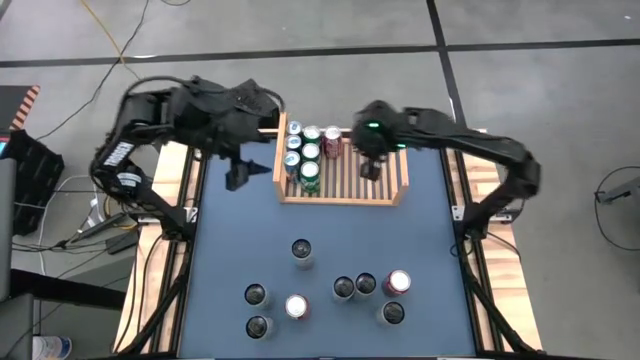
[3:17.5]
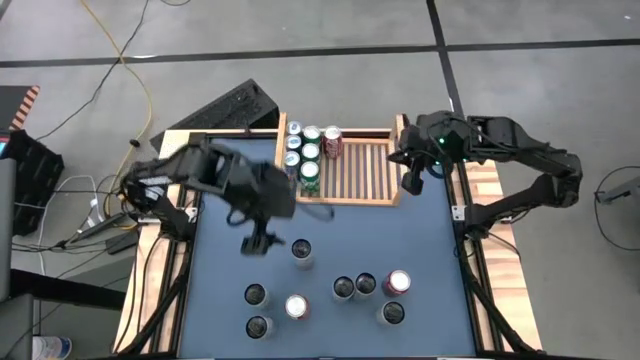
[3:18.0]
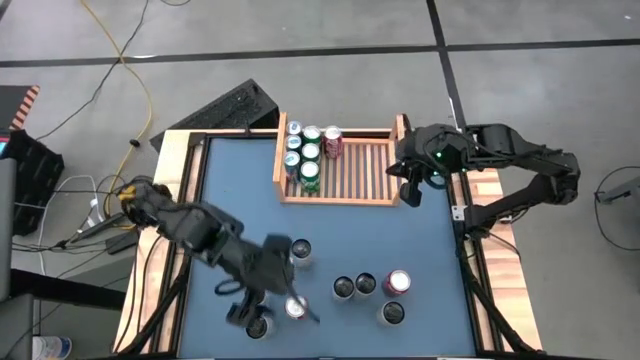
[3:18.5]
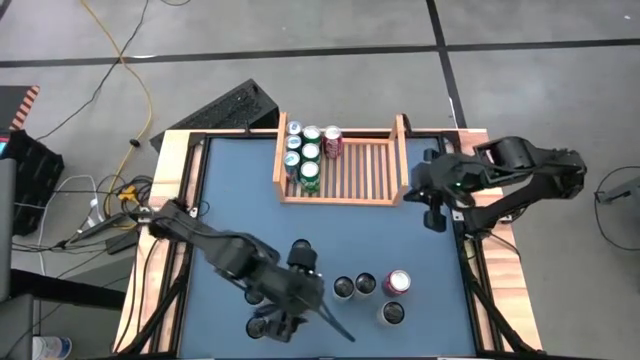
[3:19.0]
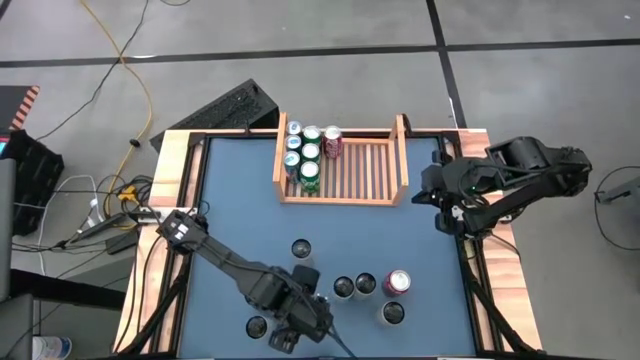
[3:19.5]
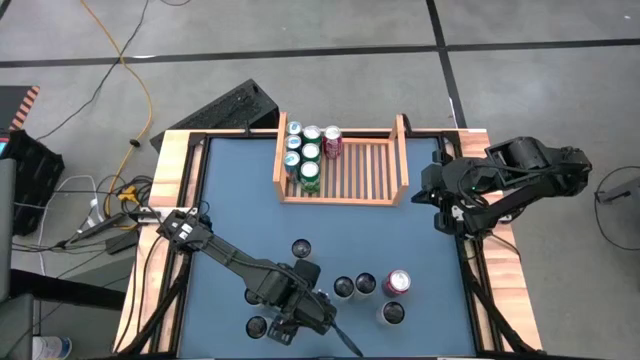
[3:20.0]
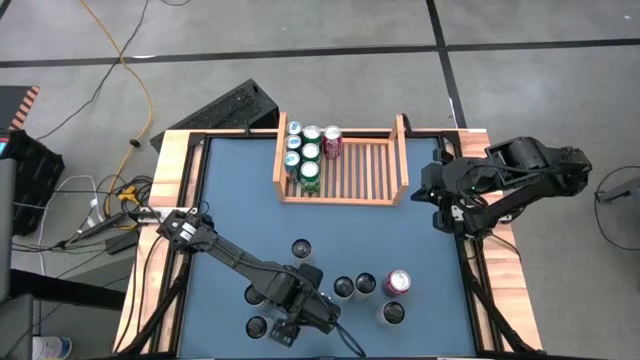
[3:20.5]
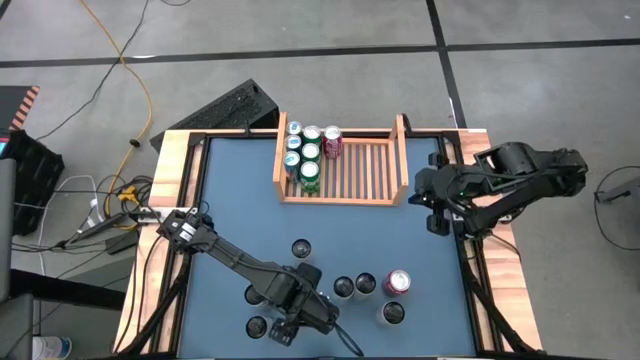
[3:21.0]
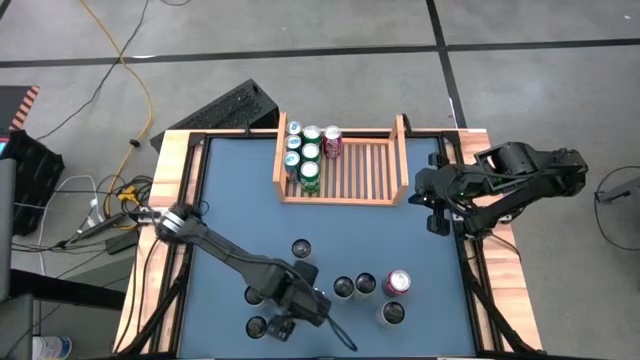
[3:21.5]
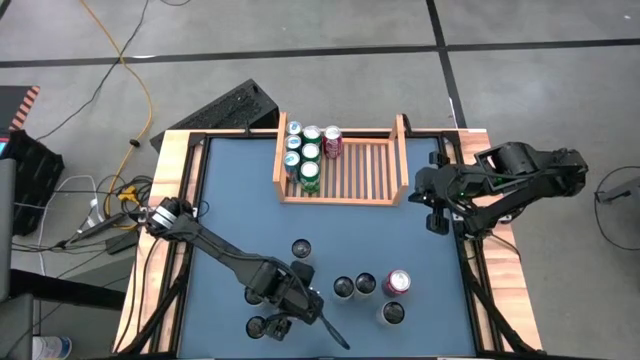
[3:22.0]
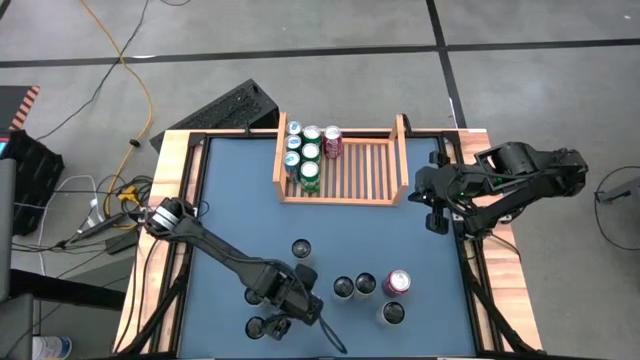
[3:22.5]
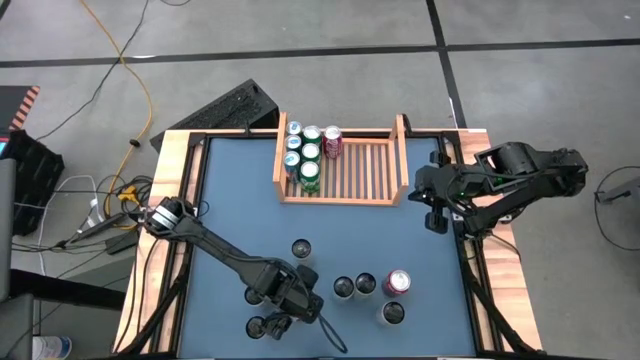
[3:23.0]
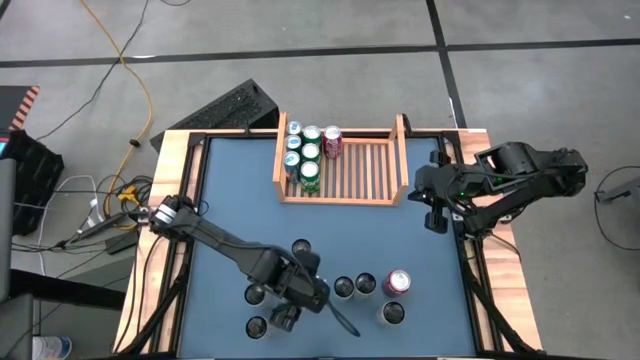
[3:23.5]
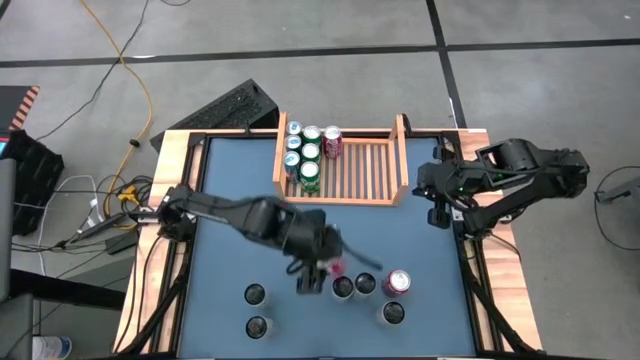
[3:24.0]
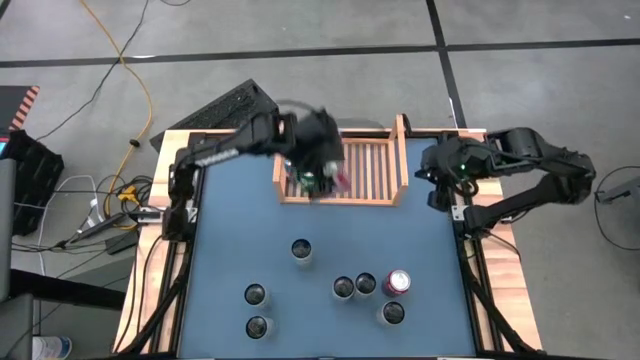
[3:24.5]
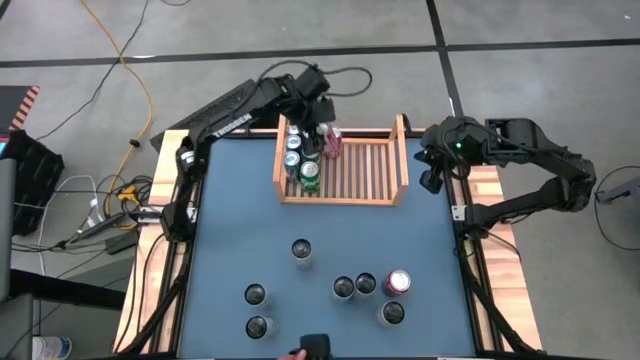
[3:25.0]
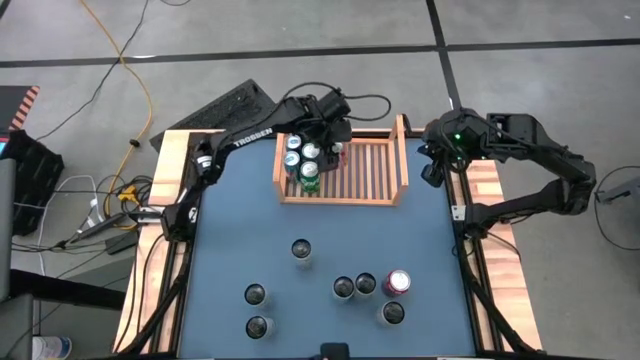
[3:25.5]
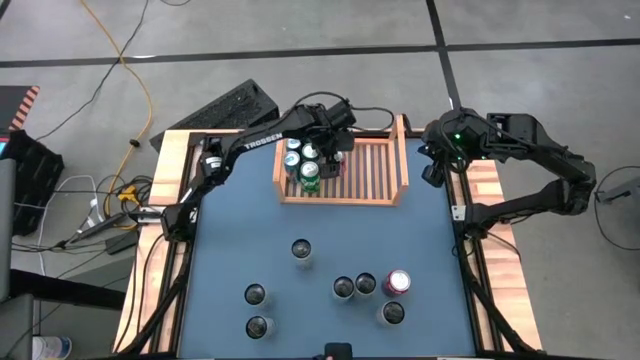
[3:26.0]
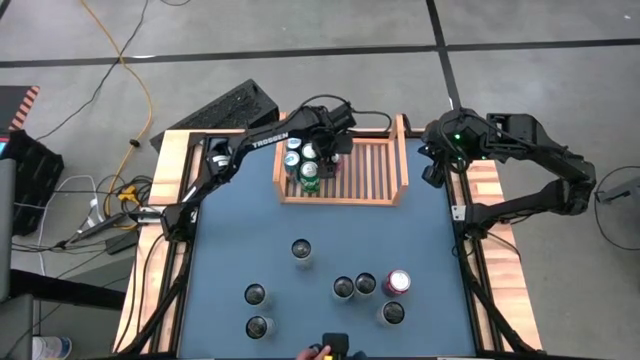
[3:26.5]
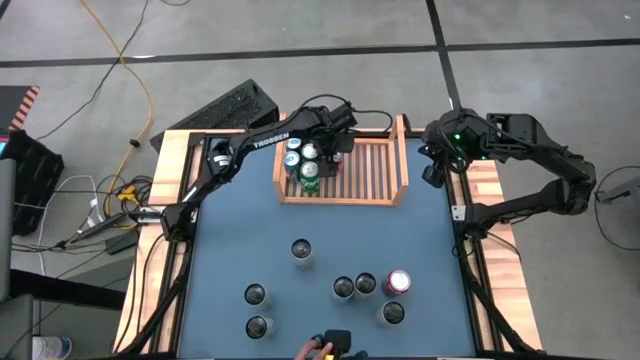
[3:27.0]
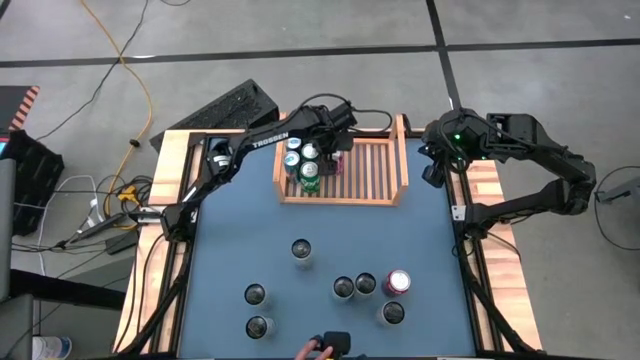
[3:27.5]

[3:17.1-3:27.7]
Task: Place canned beverage on shelf
Put the red soda can on the shelf

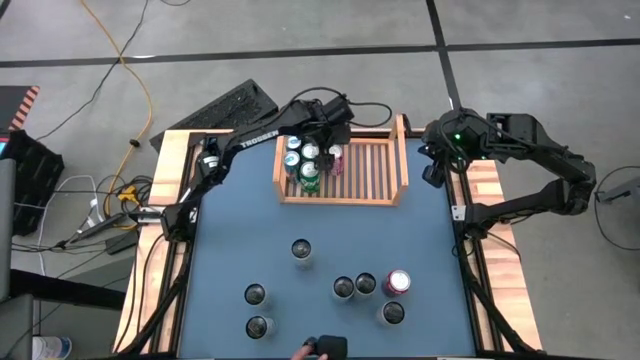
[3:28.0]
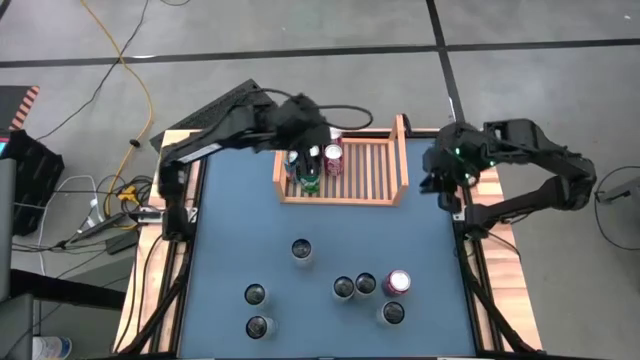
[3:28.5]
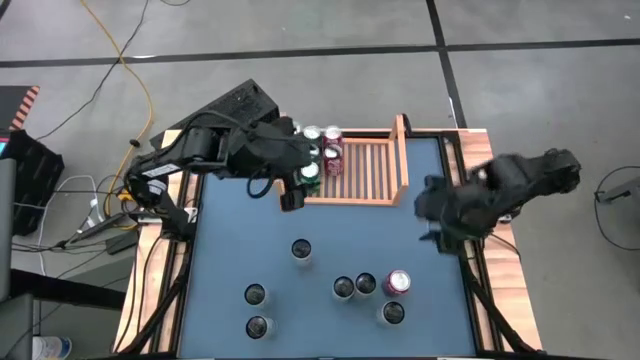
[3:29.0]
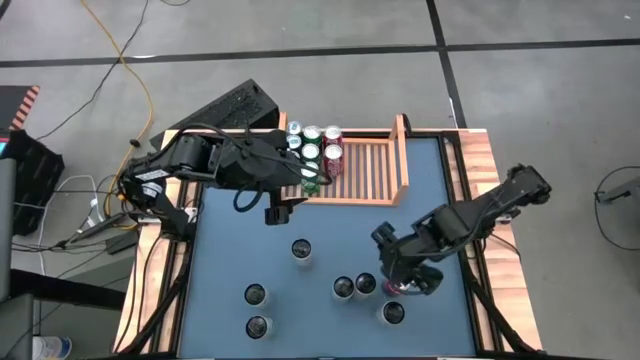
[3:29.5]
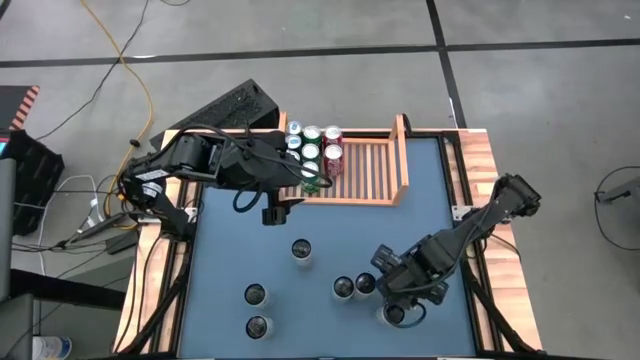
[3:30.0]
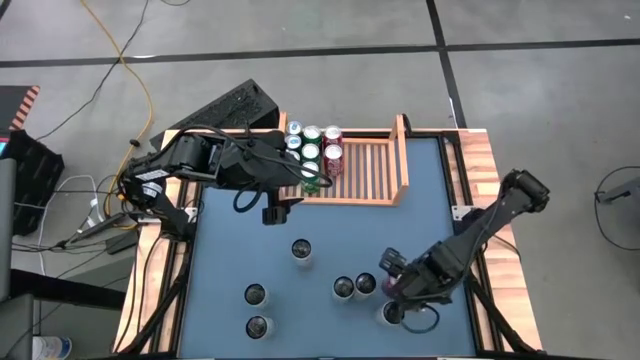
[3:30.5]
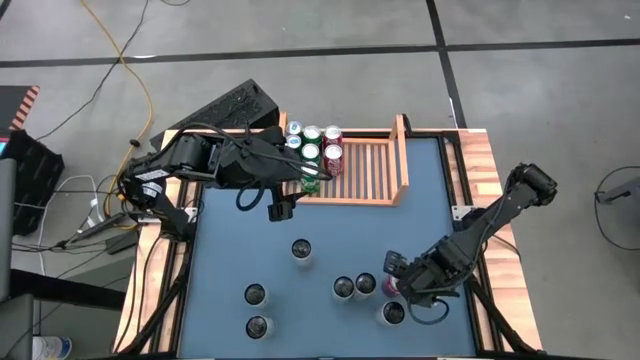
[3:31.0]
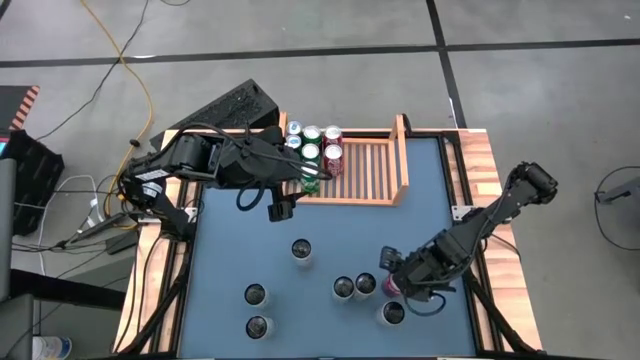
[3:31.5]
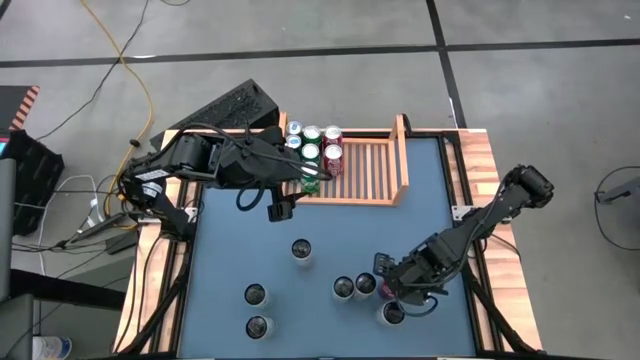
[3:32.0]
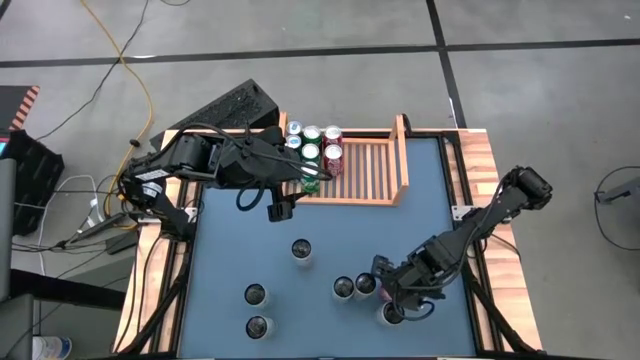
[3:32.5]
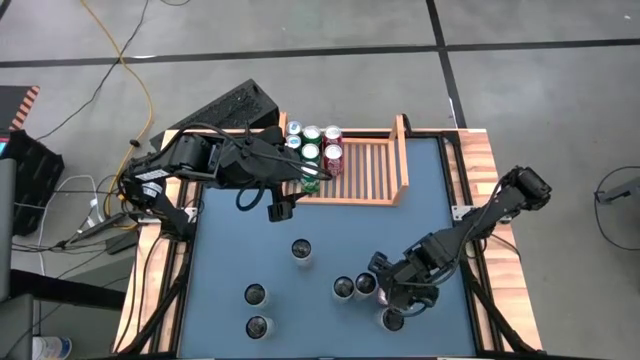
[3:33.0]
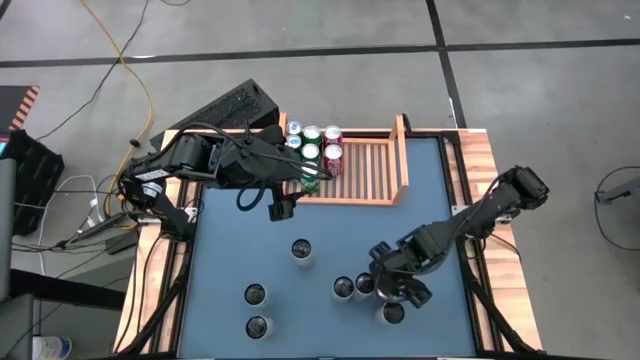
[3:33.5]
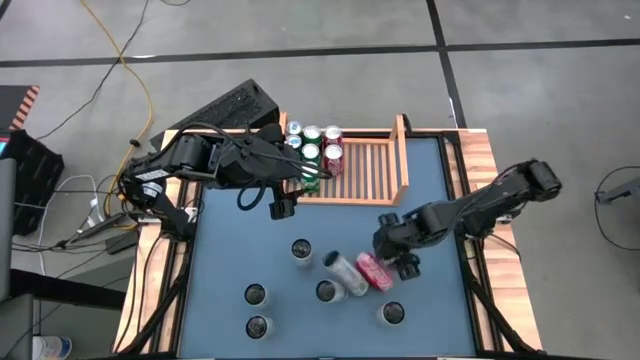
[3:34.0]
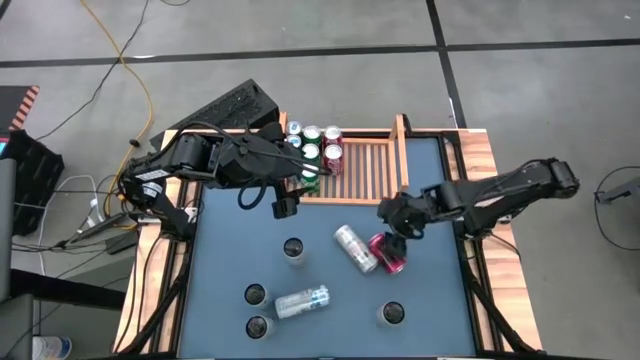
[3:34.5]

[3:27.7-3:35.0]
Put the red soda can on the shelf

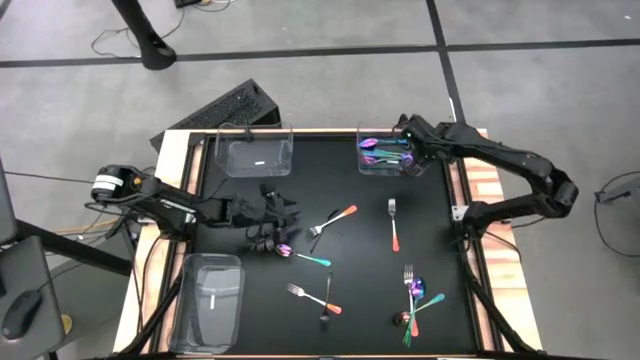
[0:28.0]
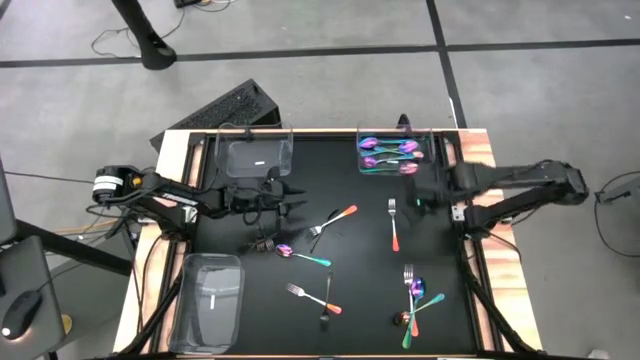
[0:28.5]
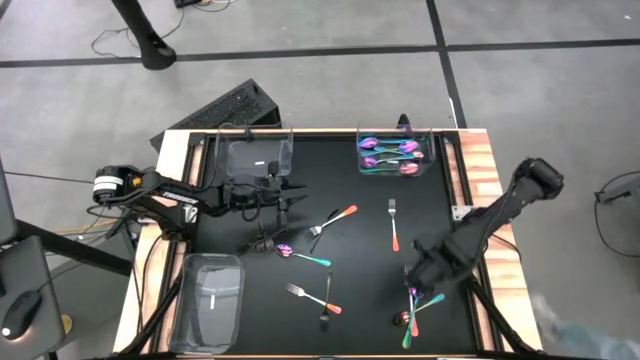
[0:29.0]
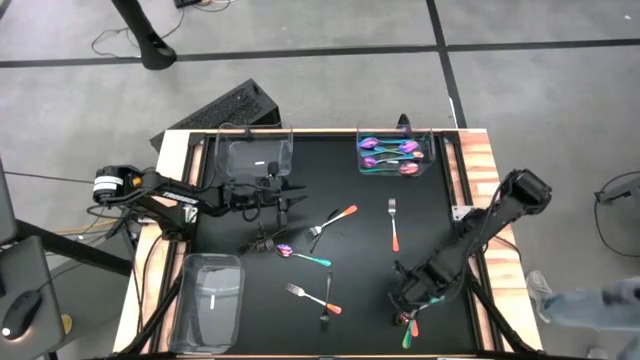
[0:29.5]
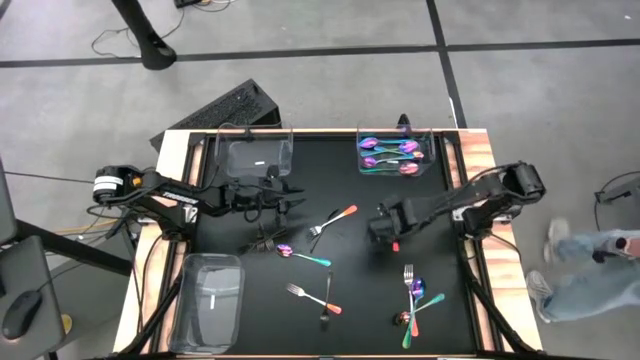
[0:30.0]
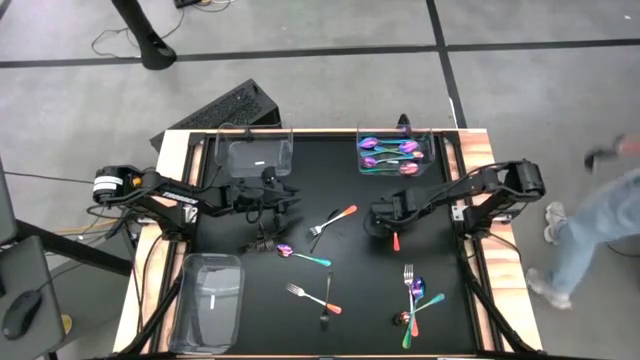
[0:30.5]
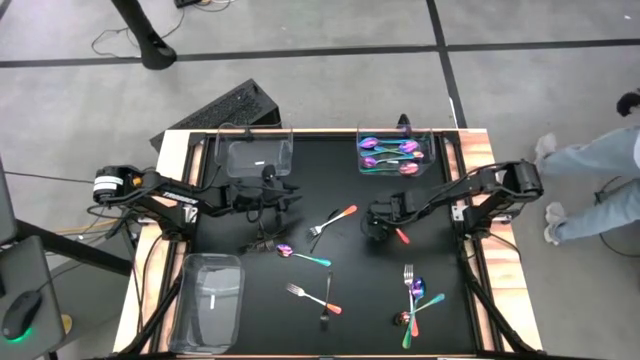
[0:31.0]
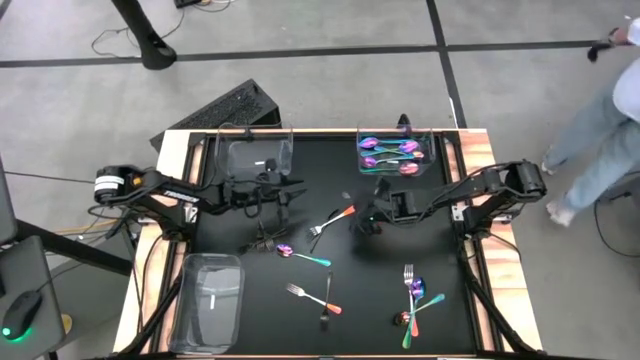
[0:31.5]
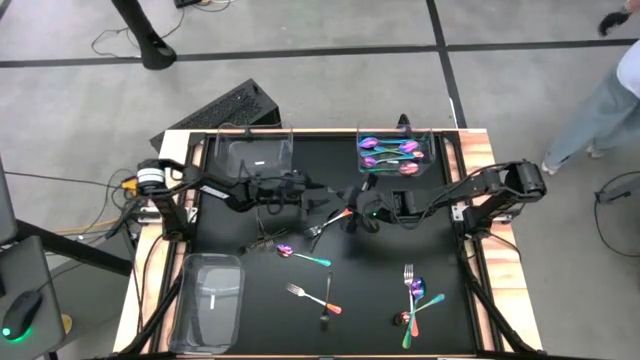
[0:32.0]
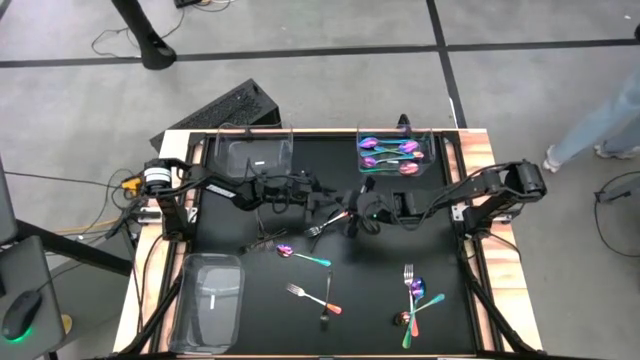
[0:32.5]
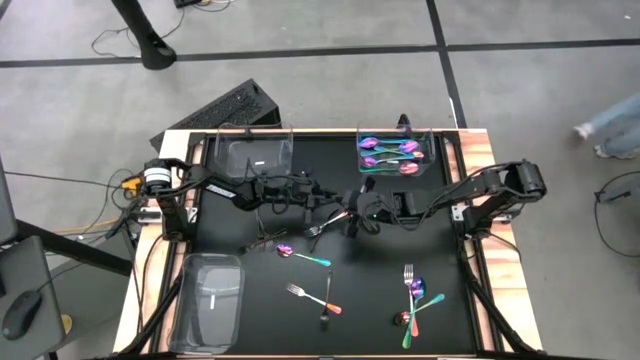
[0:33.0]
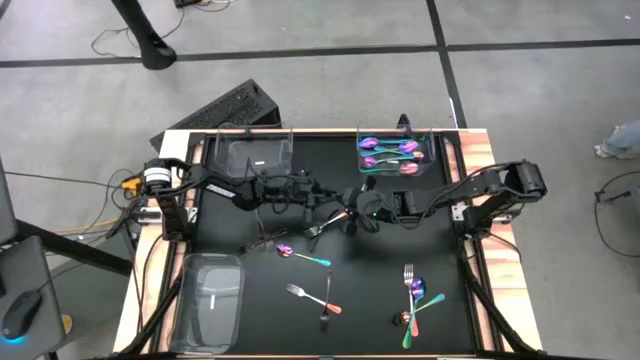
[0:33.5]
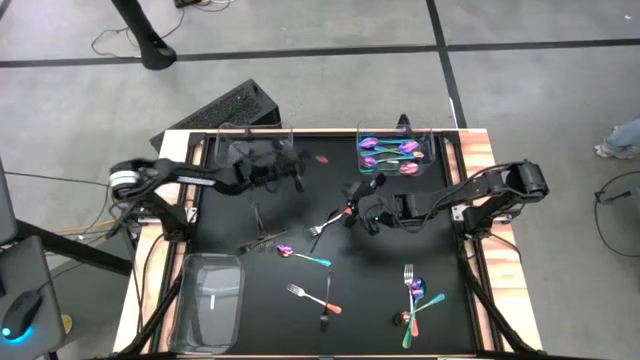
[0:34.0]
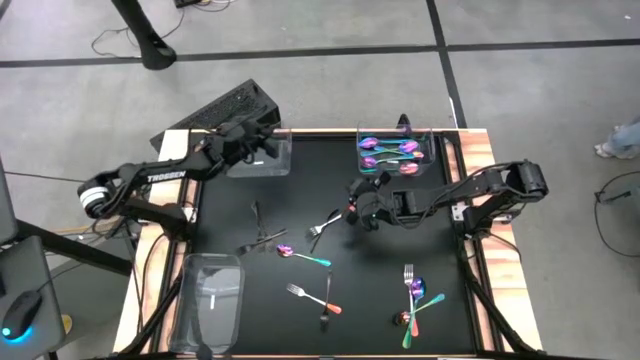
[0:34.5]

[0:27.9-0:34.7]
Task: Sort silverware by color (type)
Put the orange fork into top left transparent bin
